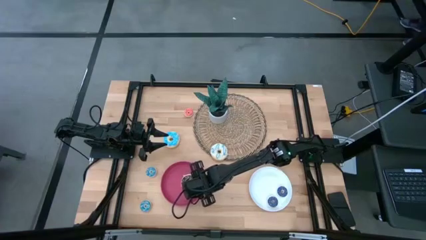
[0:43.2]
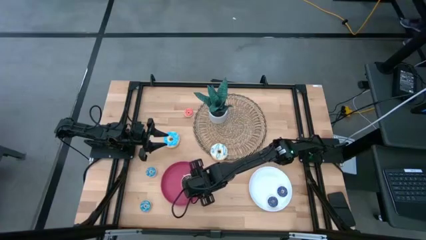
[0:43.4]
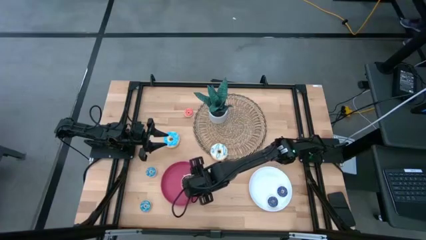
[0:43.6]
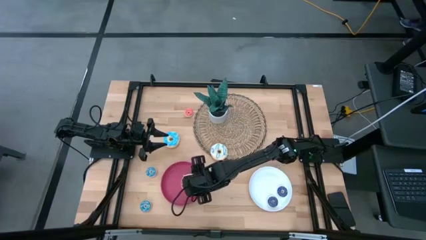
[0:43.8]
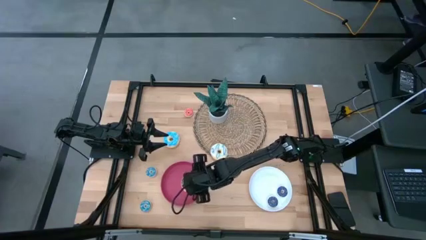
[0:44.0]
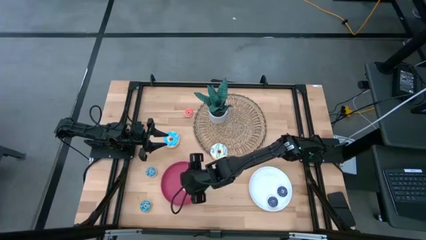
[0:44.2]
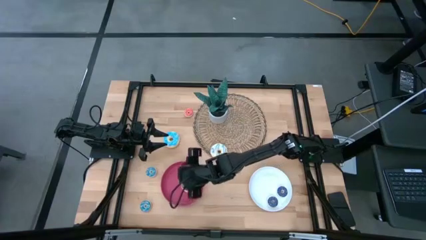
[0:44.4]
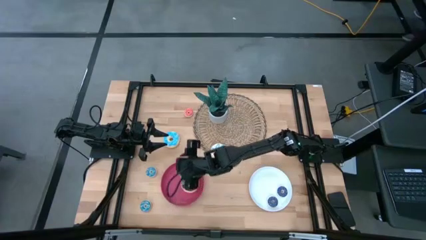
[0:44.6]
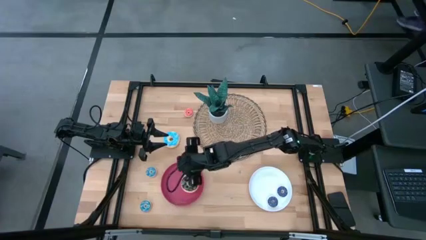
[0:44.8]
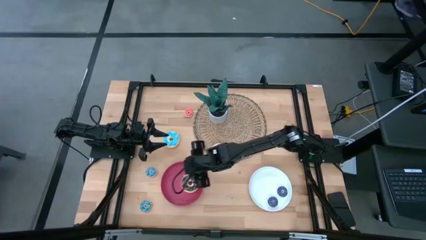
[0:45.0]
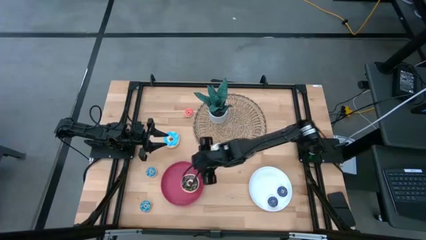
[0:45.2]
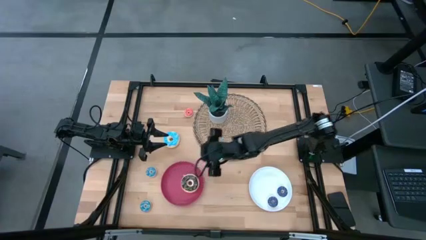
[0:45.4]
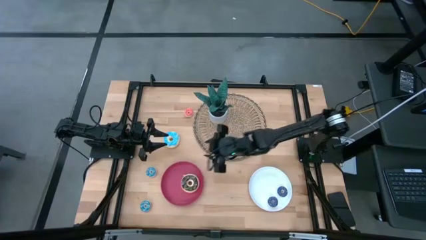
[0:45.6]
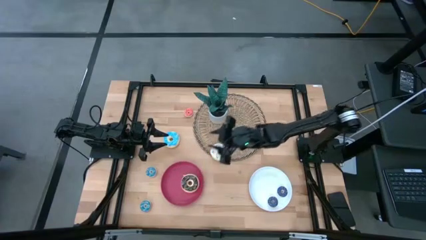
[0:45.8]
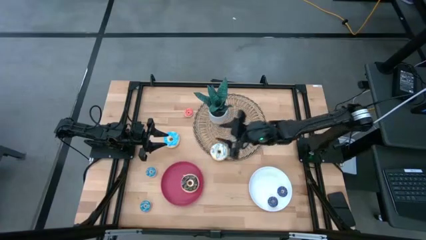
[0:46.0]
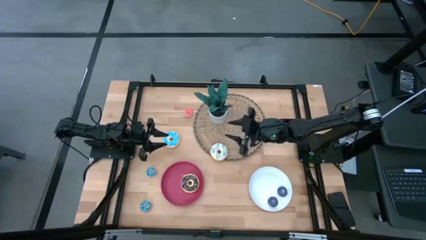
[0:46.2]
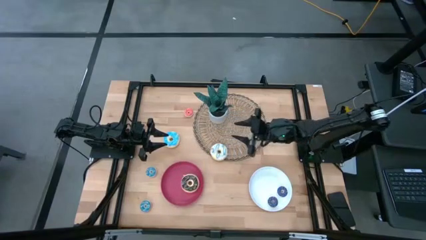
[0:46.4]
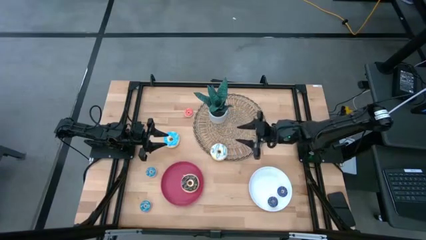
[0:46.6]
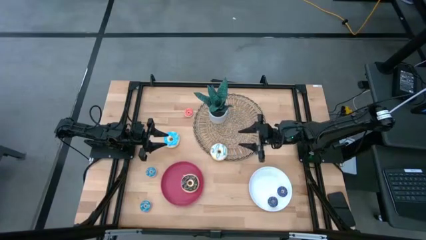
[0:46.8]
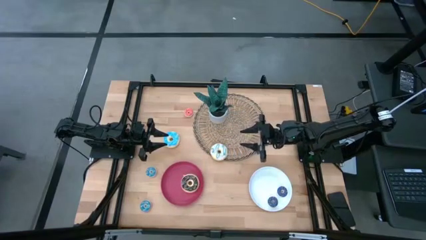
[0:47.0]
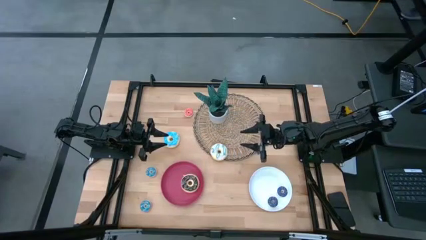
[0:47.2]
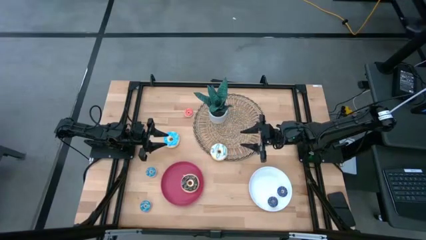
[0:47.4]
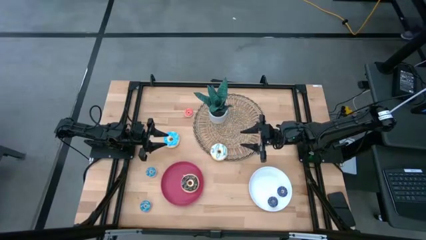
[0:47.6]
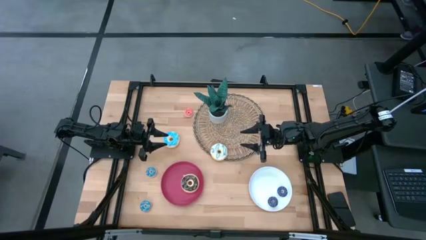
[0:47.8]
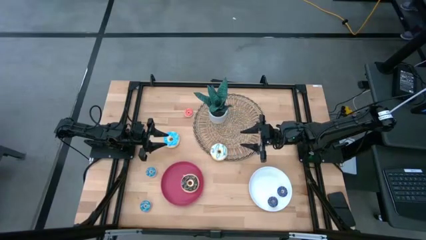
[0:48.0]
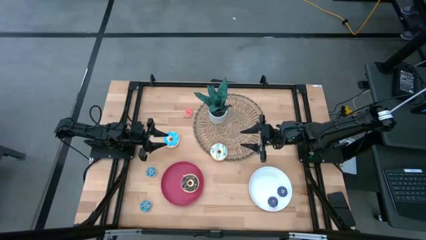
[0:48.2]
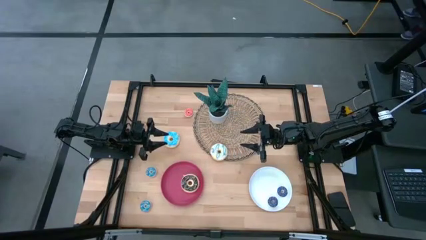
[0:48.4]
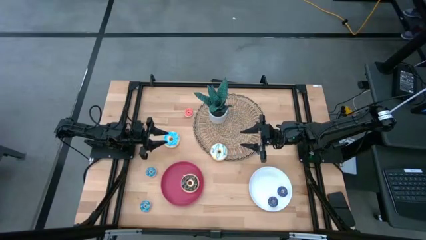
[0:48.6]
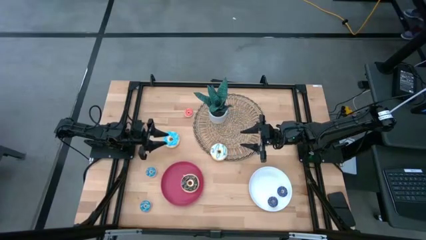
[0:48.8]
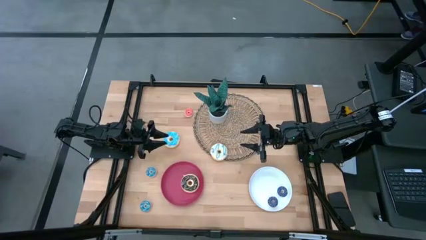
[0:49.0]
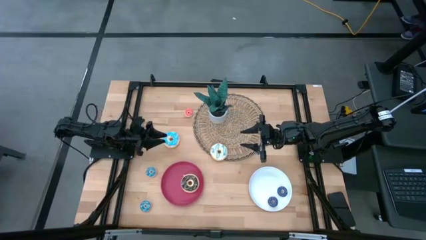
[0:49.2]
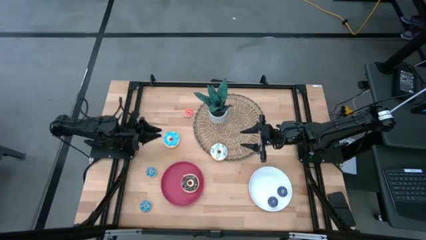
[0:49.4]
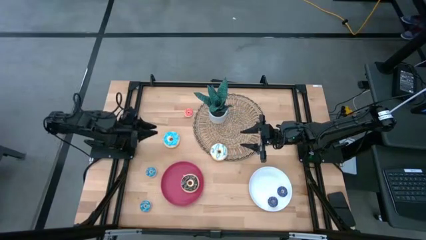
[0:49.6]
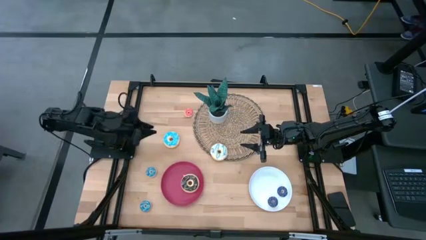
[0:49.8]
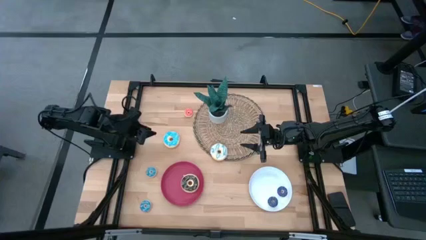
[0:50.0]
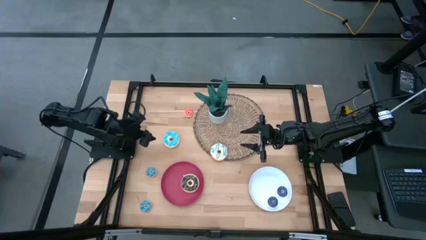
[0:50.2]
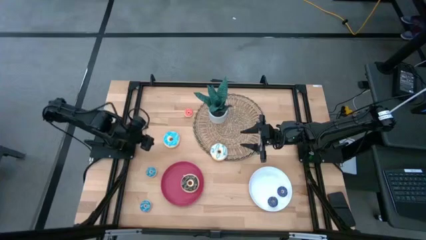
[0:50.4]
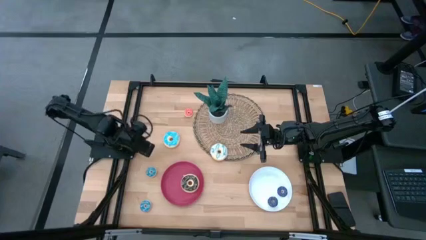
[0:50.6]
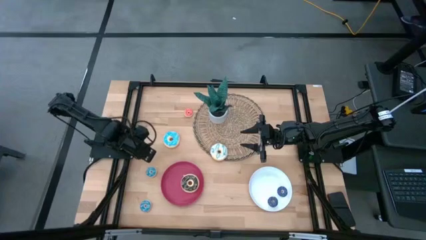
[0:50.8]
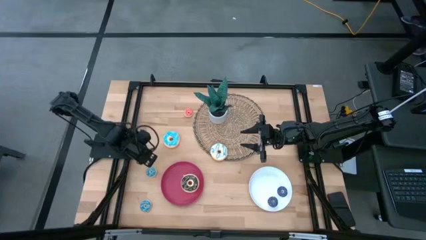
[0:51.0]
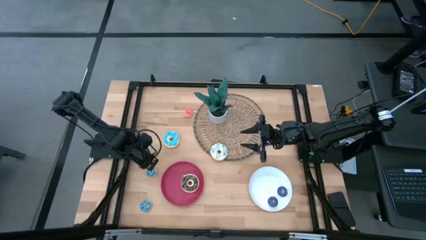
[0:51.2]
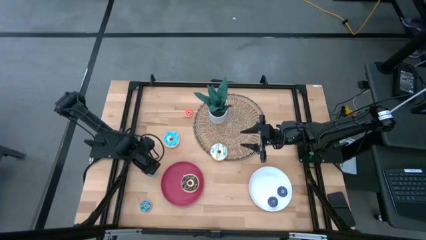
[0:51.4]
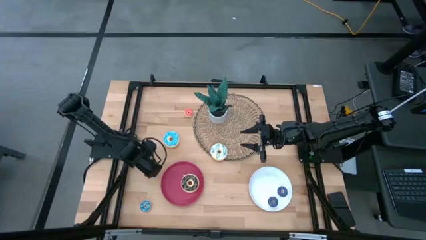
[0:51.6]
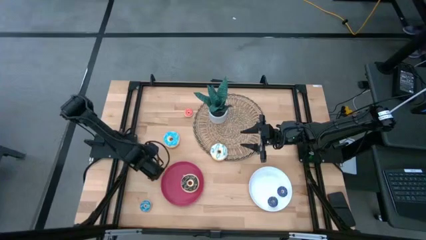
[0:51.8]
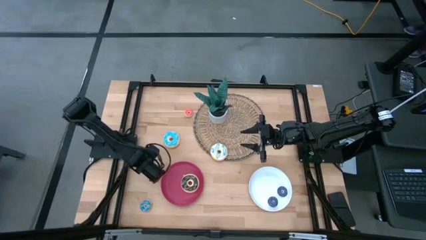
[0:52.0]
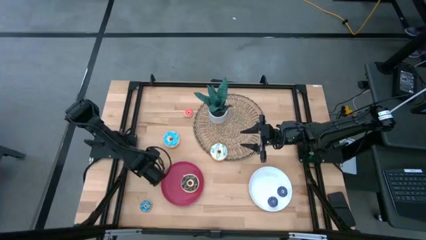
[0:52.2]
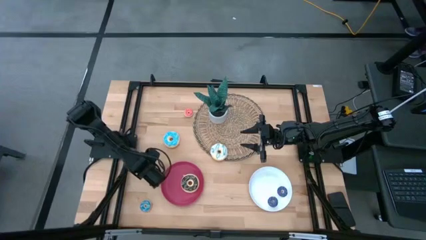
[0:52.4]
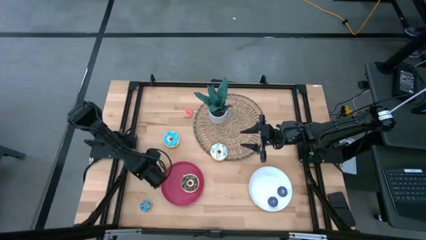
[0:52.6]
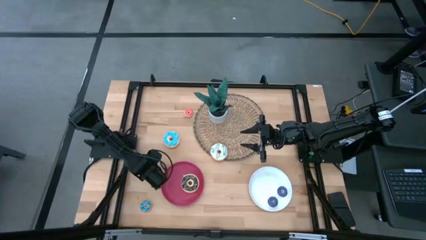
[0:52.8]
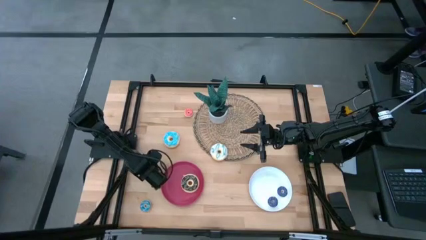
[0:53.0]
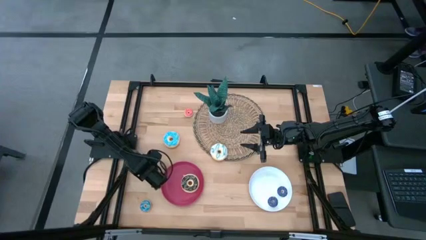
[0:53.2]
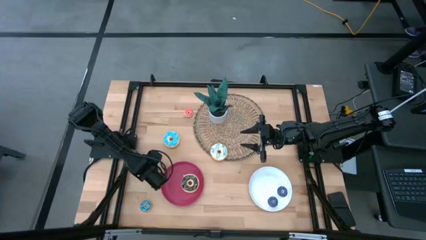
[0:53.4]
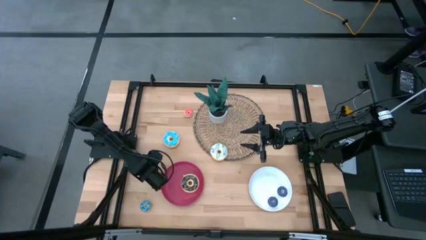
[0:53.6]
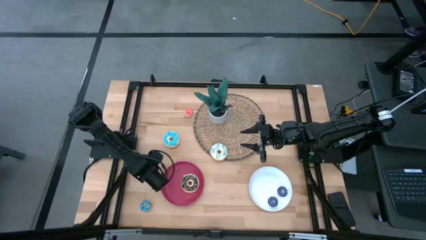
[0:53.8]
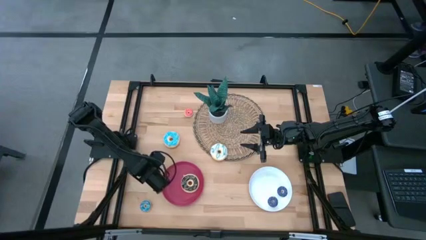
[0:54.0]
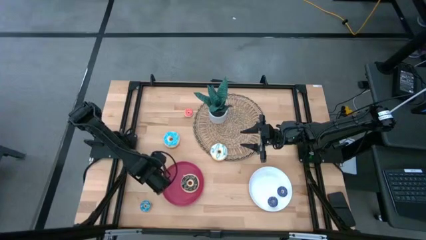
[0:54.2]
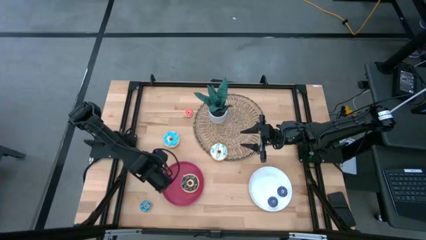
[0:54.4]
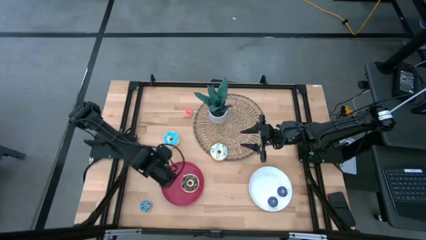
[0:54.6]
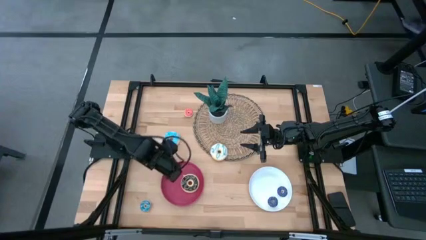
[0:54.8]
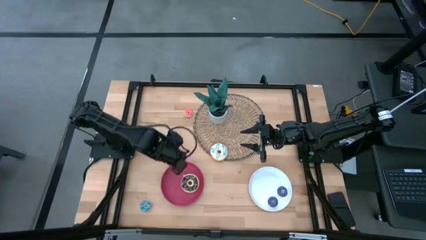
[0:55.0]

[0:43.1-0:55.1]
Task: Pick & Place donuts
Put the top blue donut on the white plate
